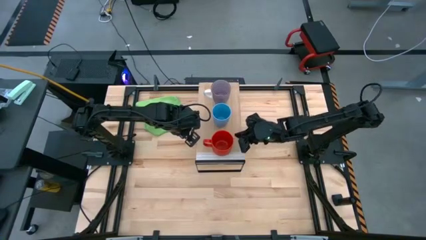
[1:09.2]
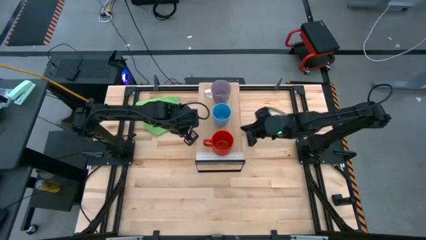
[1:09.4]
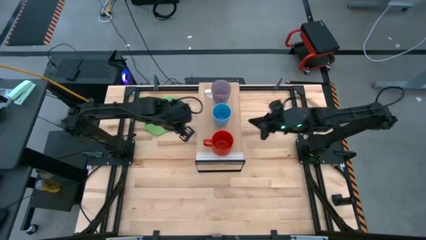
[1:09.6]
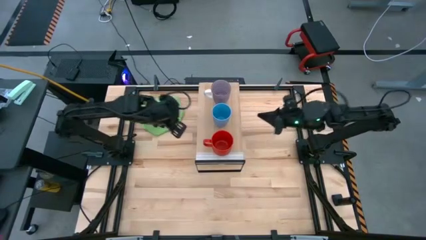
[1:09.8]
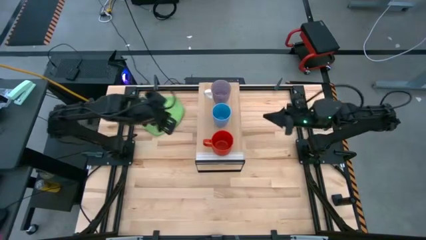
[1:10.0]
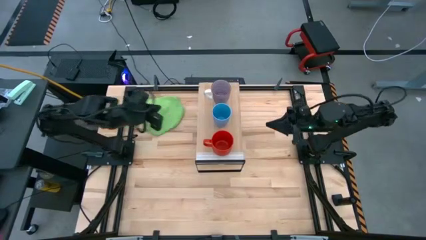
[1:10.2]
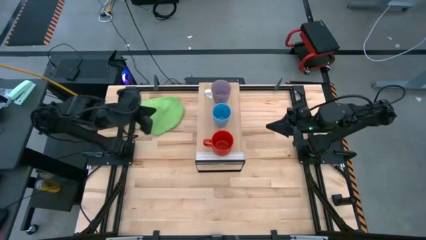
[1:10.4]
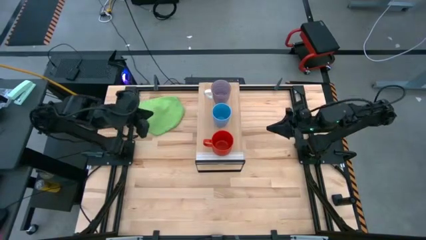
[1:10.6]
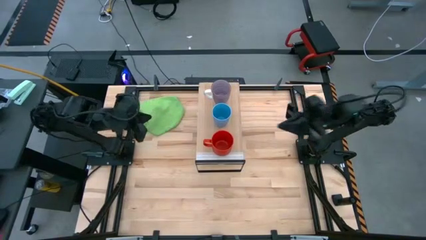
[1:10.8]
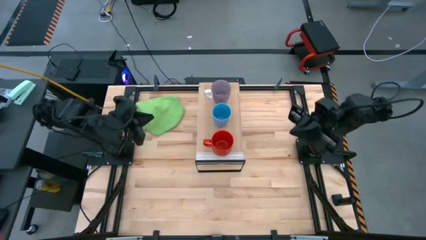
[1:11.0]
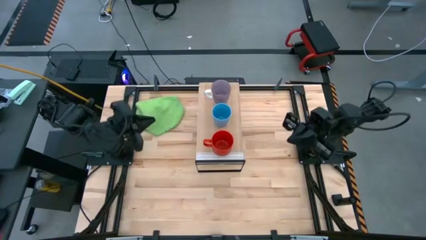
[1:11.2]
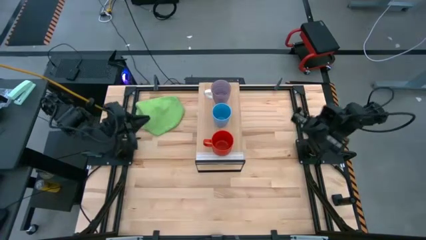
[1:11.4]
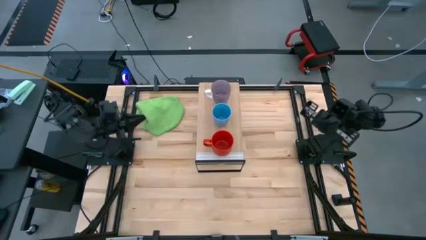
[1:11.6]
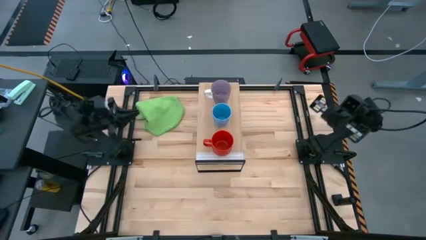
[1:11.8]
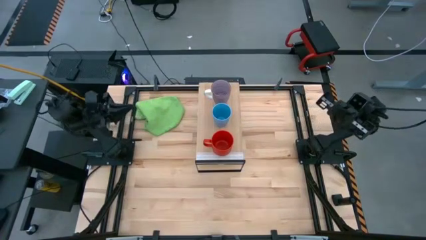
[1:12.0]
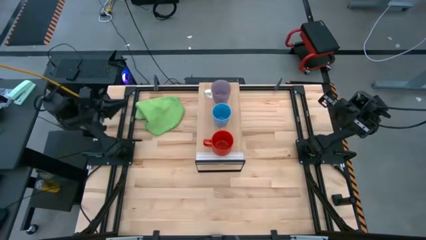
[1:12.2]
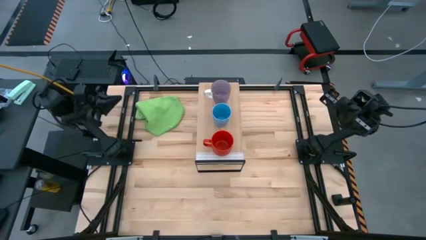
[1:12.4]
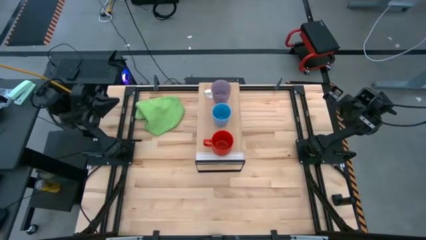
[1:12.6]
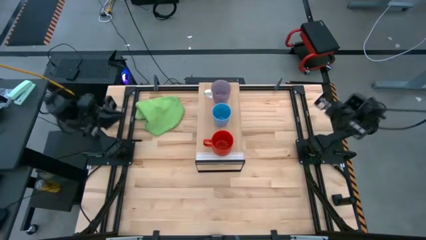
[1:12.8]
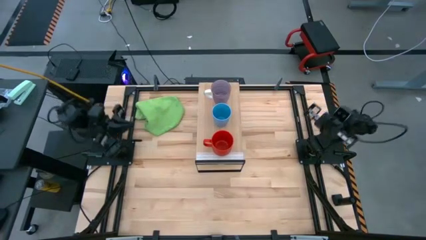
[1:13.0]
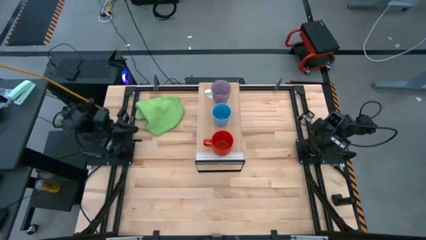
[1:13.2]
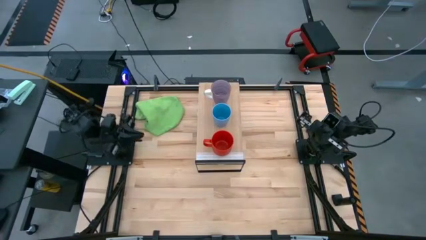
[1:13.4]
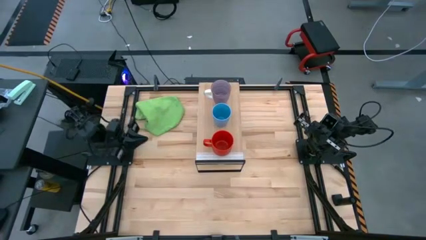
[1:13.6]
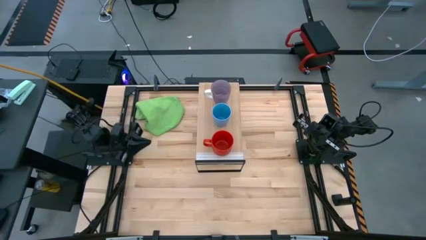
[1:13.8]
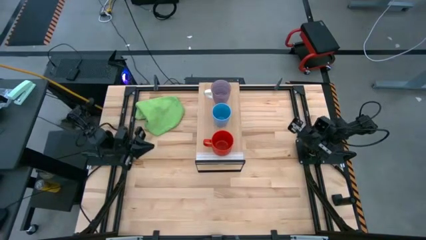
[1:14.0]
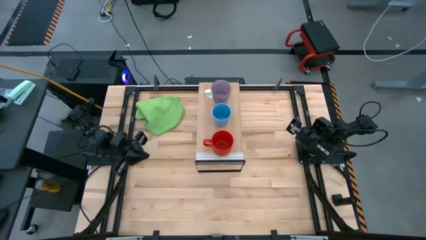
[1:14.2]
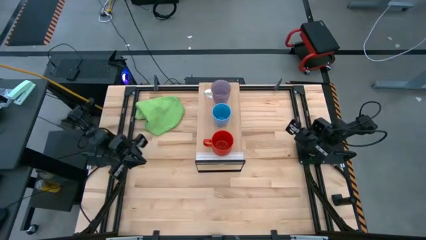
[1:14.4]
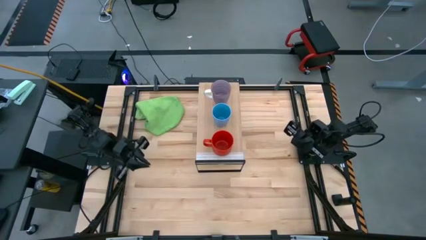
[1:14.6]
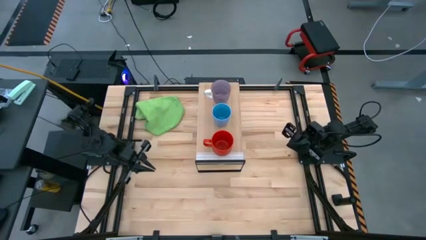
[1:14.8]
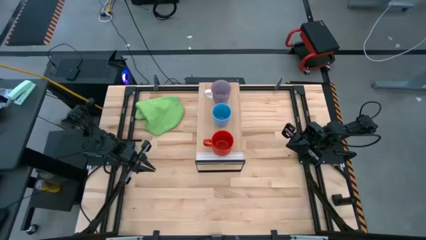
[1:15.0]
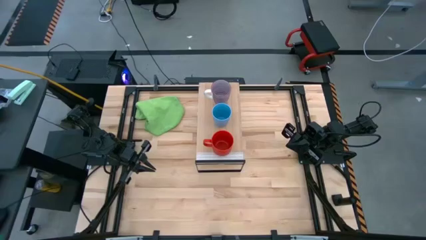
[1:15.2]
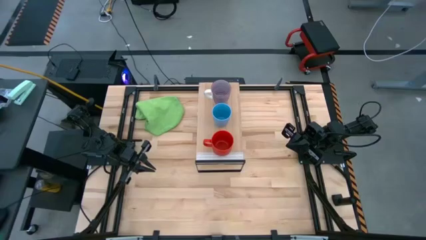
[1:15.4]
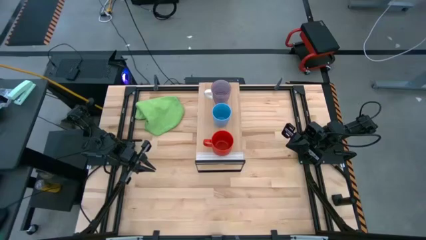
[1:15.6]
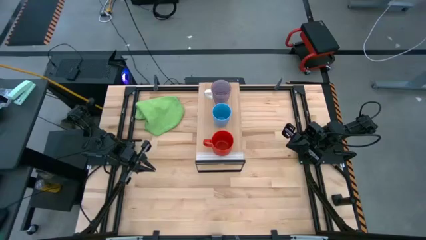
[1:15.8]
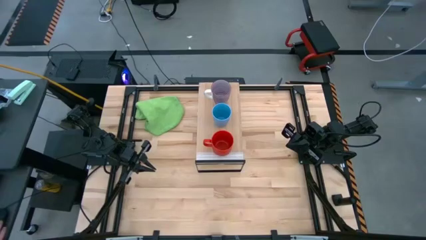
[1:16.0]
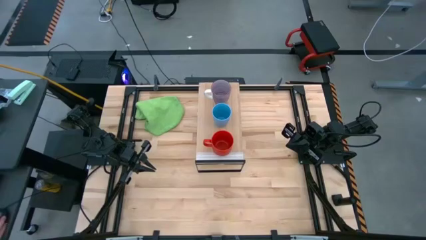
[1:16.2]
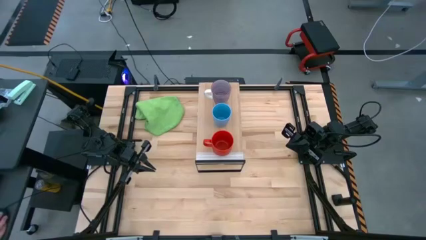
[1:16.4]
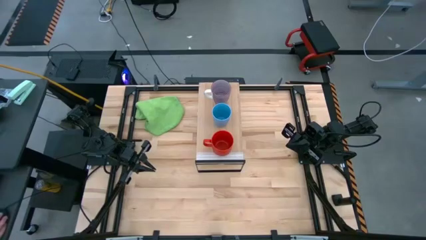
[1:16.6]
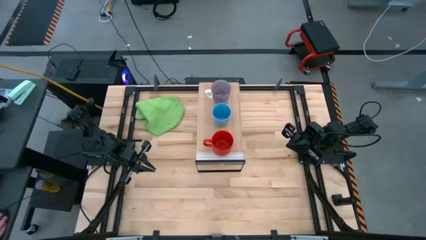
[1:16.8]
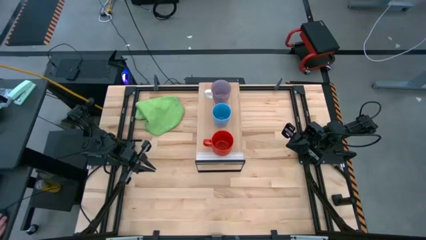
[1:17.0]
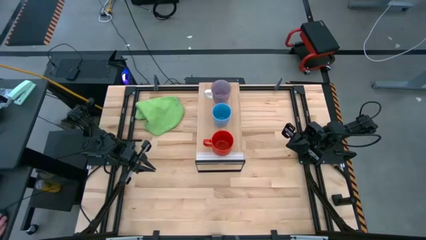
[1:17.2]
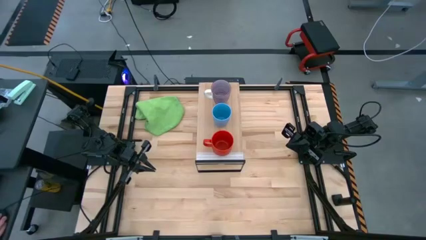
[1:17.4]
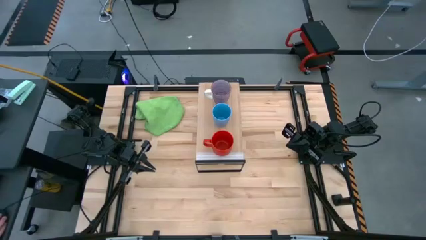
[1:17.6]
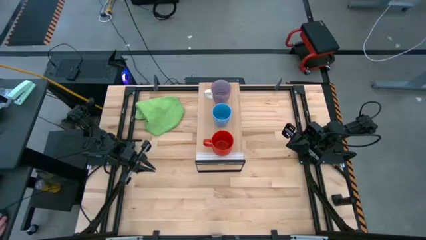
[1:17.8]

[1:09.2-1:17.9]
Task: Stack small to large cups/mugs on shelf
Return to Home Position

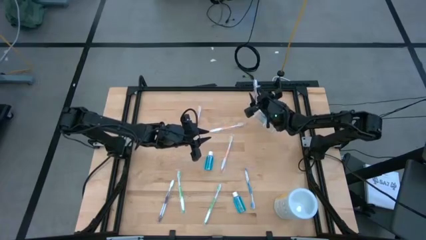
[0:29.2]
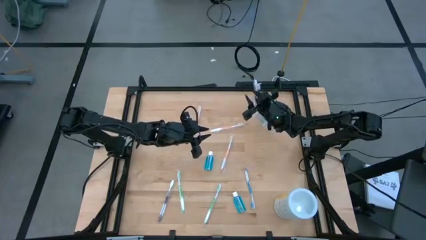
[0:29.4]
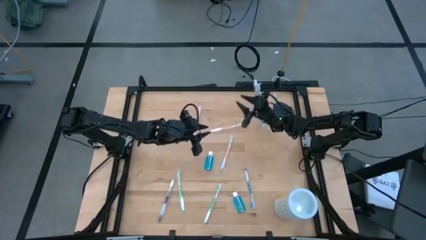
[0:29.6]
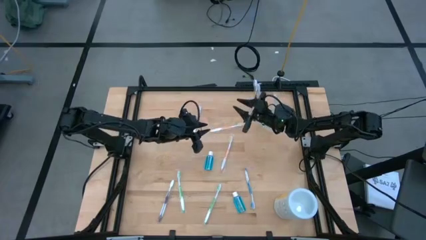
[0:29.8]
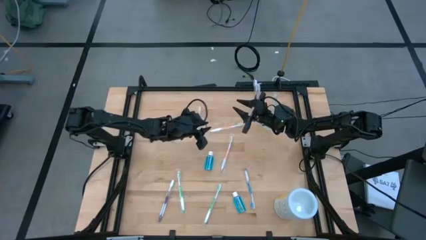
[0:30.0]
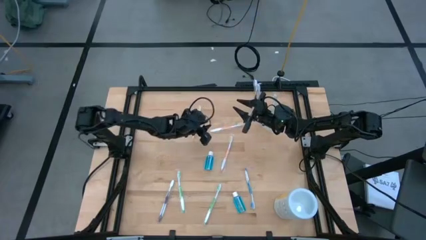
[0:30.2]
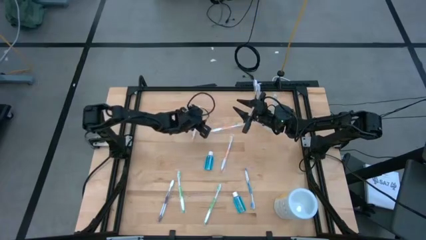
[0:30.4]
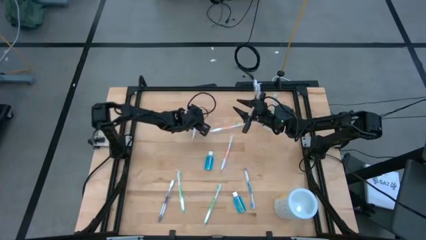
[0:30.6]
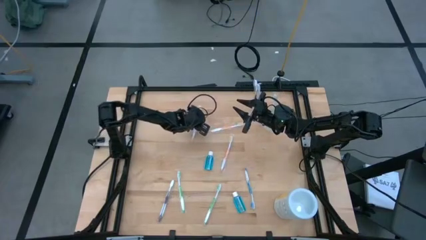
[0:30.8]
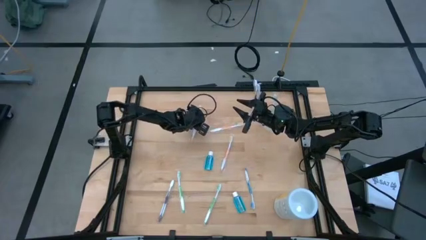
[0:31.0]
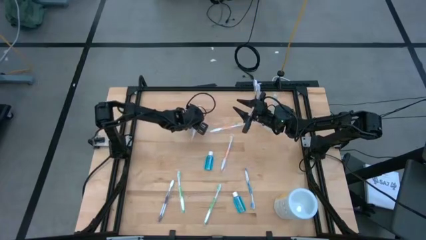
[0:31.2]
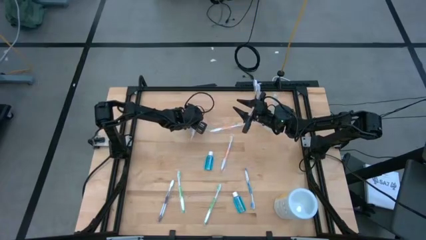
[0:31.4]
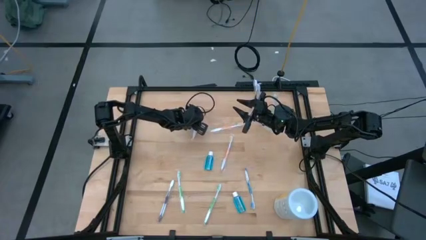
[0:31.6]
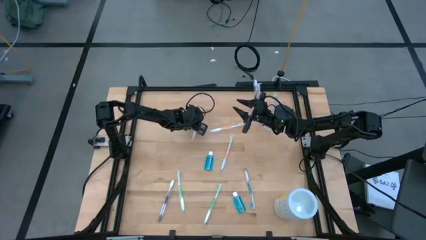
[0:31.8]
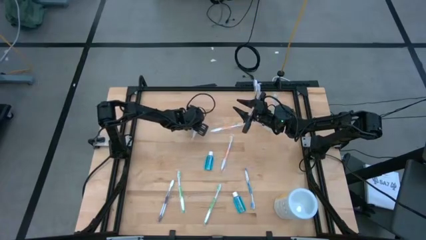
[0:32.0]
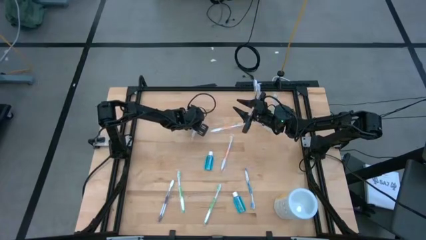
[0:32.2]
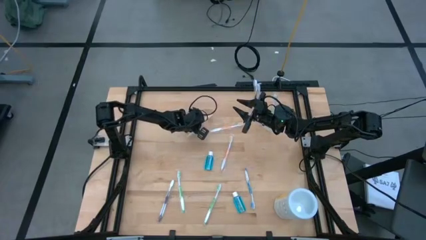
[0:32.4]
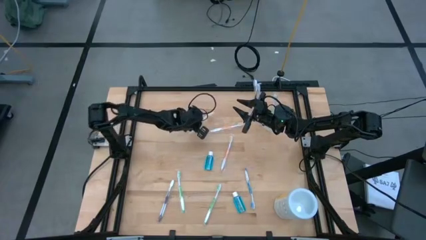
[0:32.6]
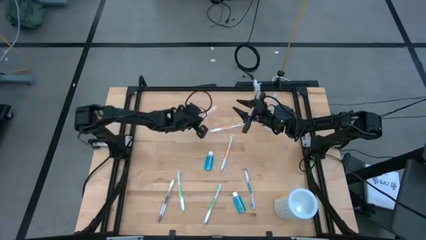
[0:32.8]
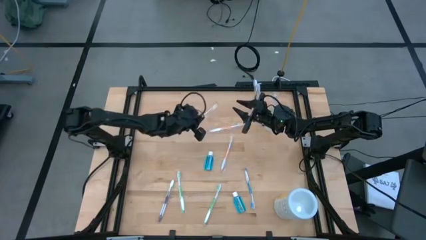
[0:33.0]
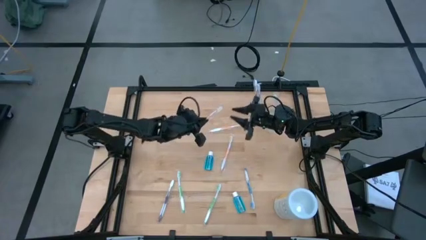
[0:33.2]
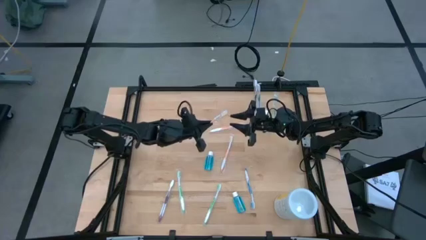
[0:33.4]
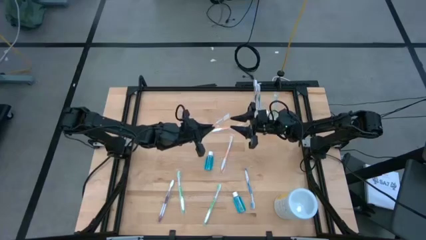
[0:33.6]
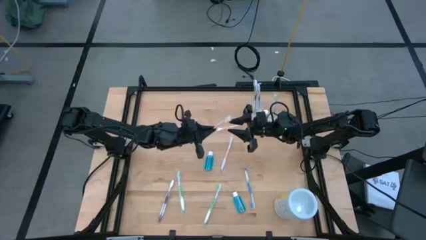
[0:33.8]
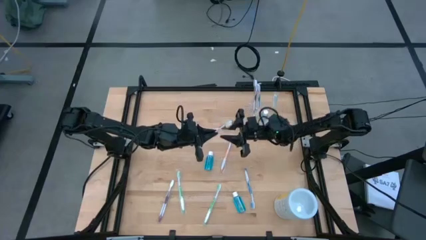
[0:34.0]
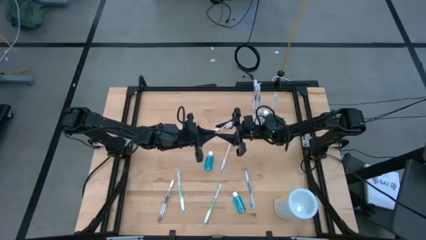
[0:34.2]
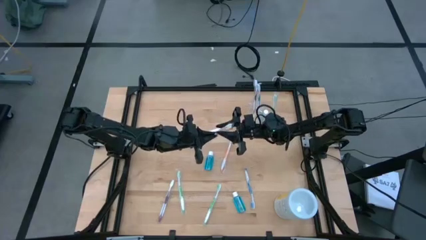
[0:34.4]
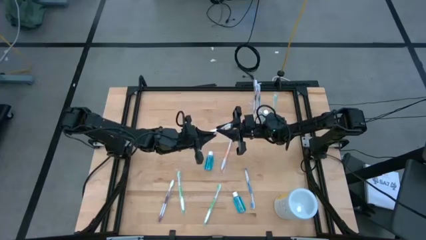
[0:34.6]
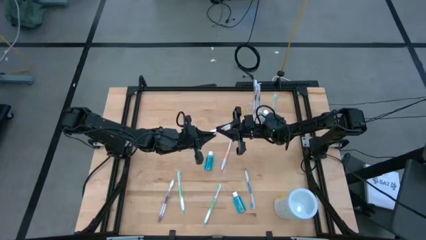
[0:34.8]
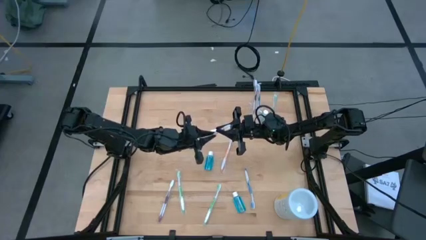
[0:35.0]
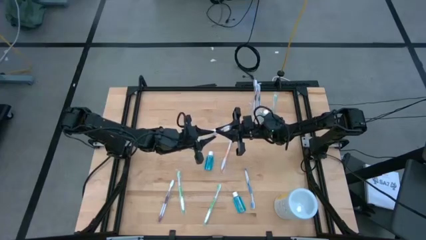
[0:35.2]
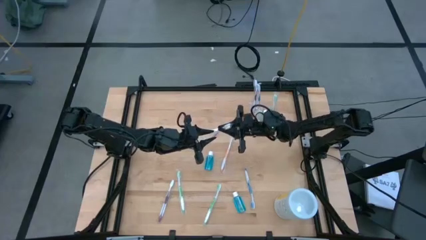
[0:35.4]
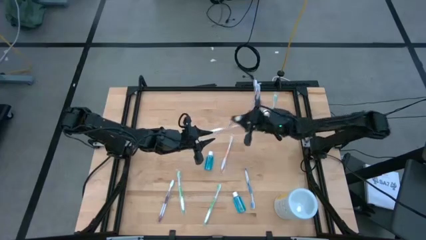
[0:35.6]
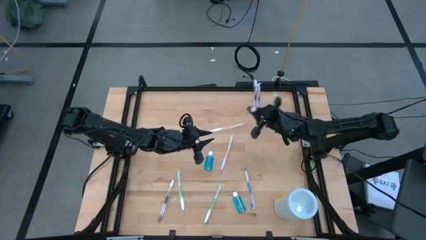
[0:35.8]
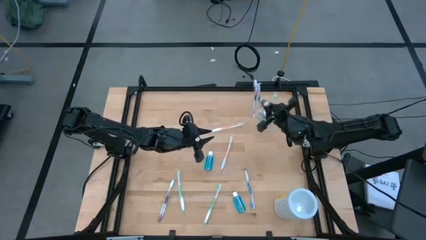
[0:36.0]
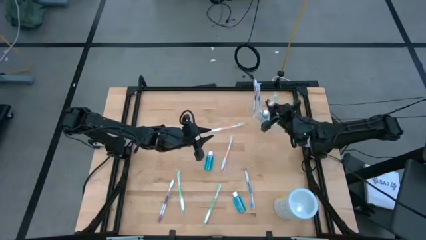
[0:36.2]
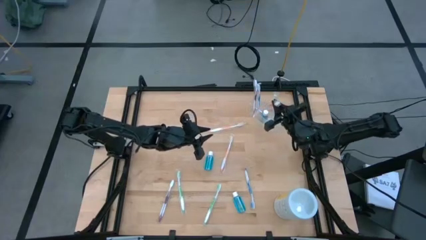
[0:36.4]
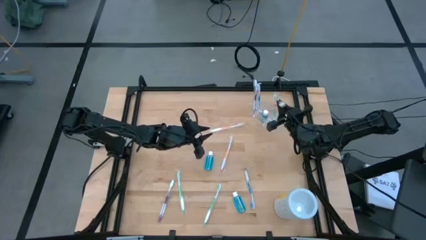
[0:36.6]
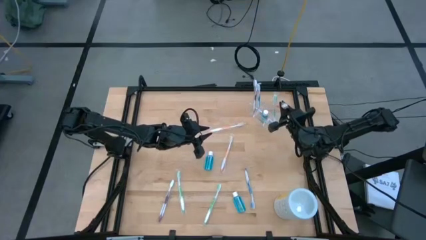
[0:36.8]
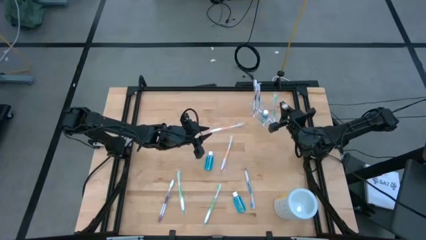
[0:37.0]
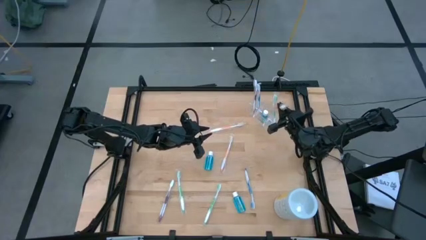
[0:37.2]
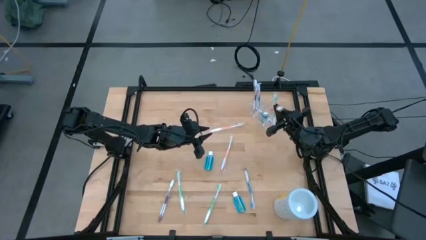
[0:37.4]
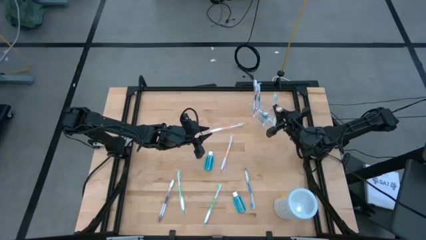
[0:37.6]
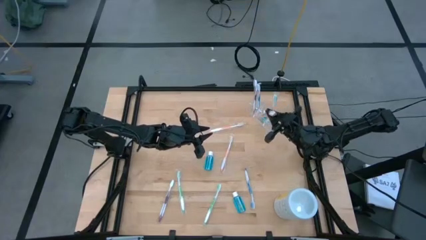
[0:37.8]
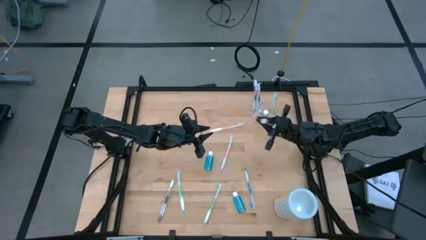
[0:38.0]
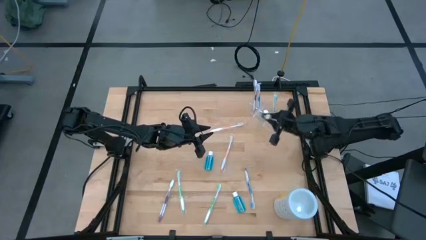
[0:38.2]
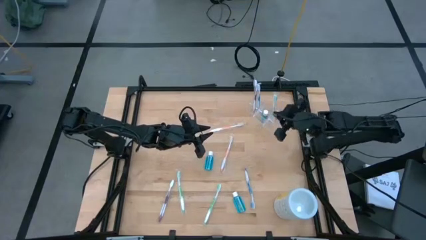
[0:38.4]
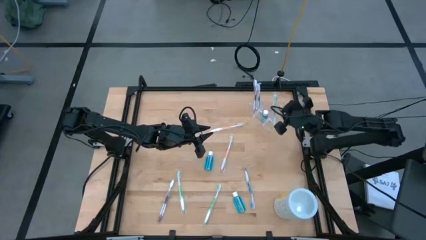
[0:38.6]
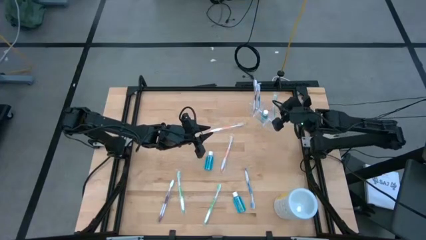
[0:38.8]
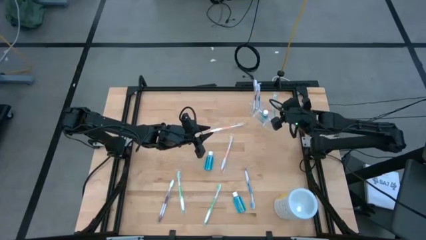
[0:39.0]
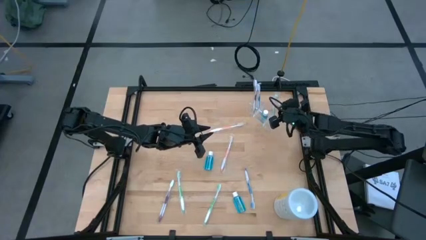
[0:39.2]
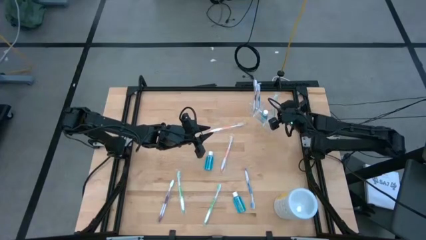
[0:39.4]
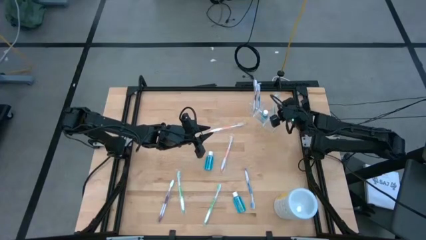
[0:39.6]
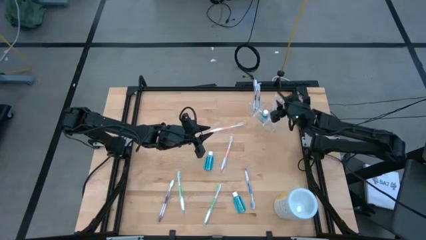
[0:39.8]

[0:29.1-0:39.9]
Task: Pick & Place toothbrushing station
Put the top left orange toothbrush into the transparent organizer
